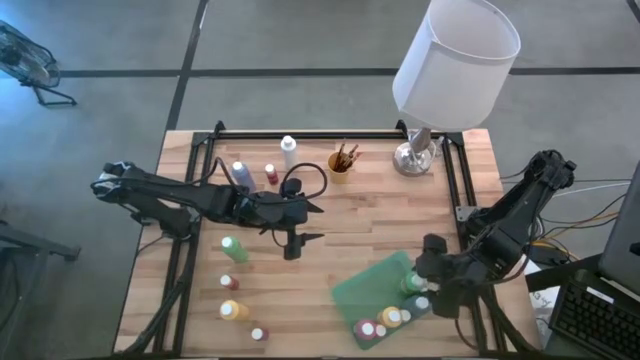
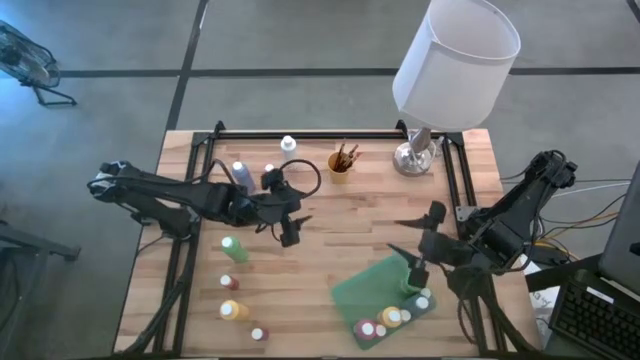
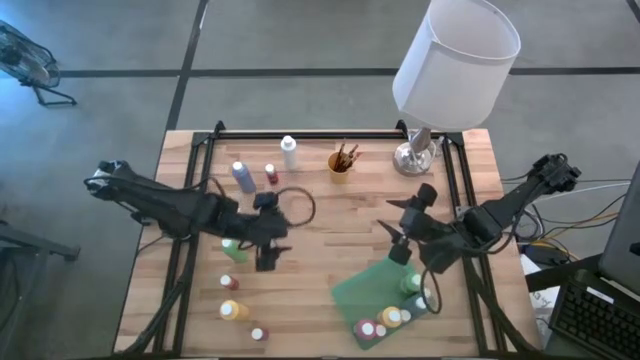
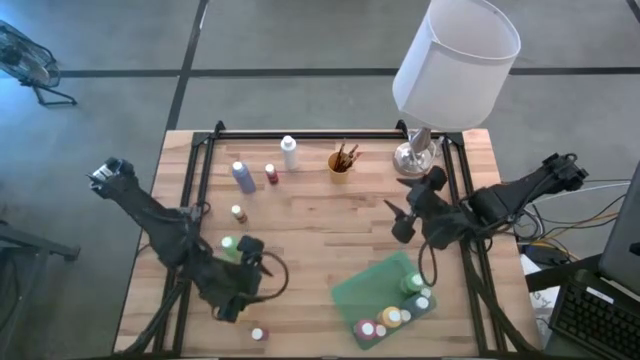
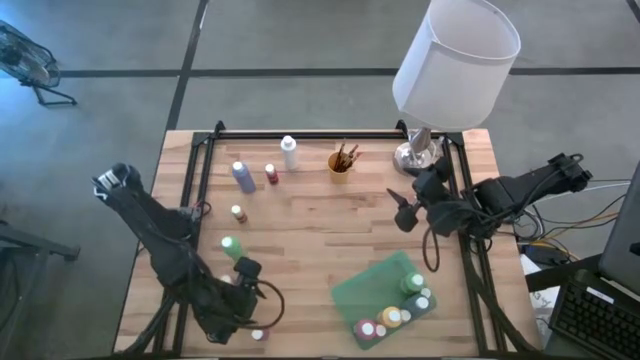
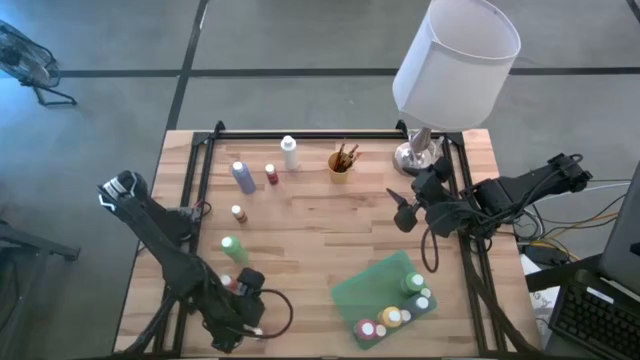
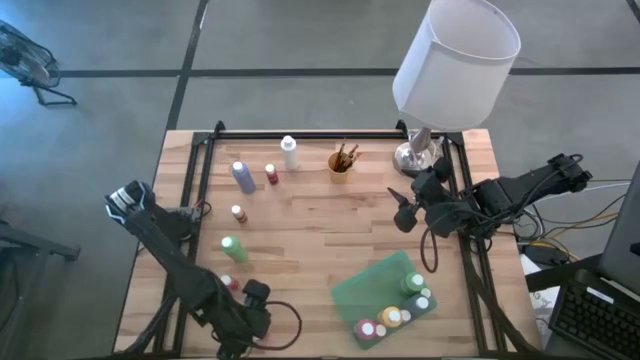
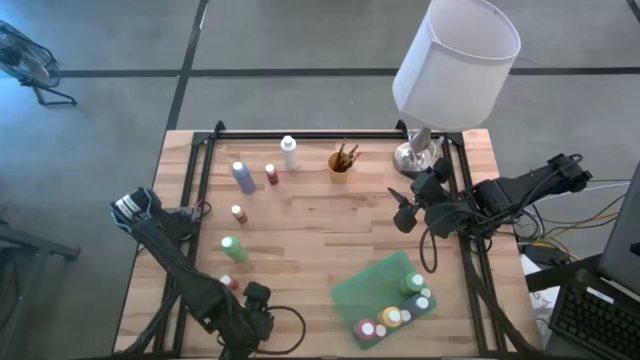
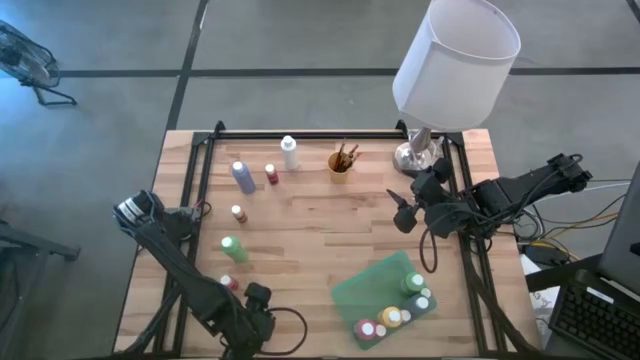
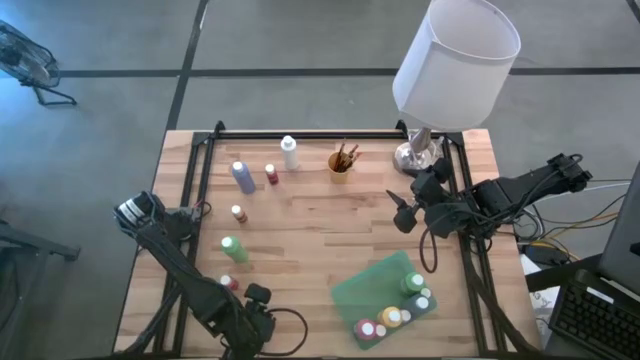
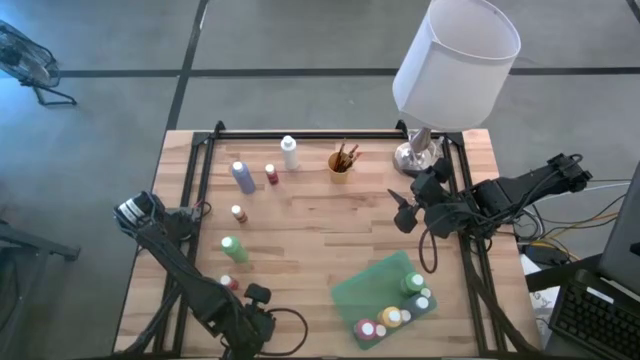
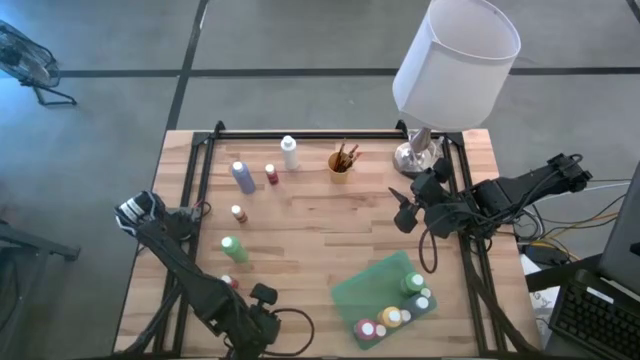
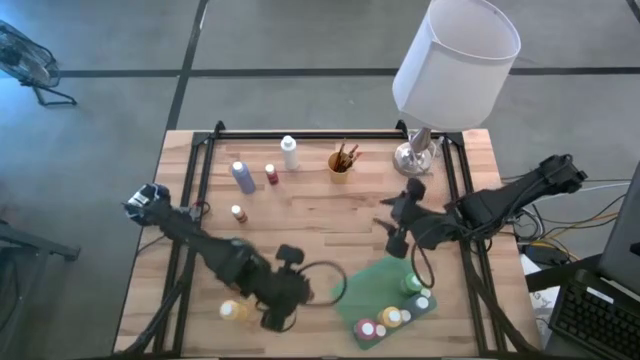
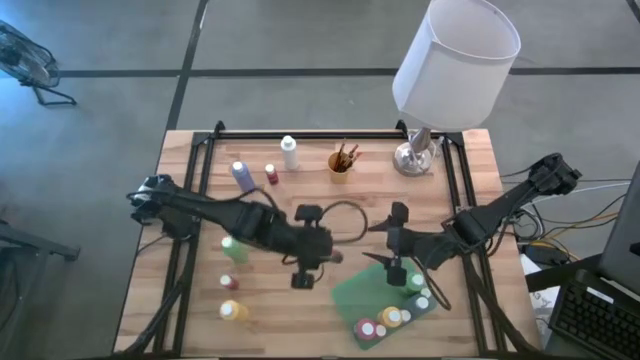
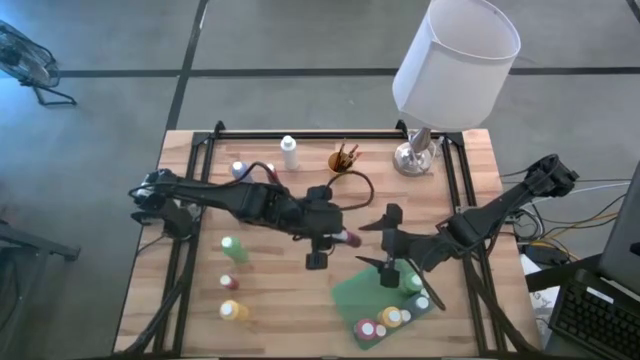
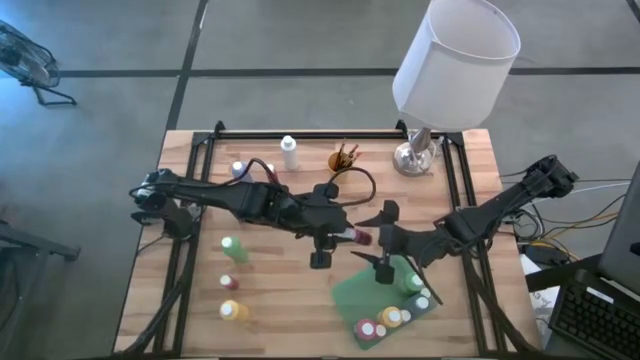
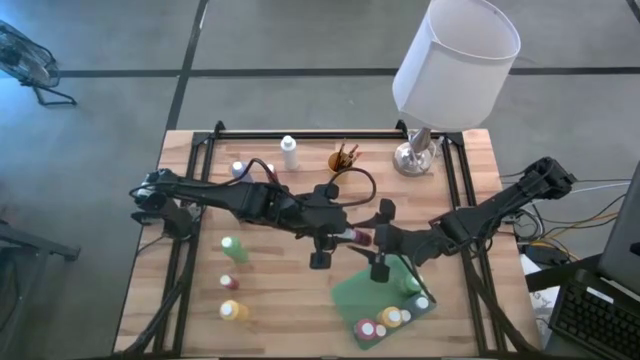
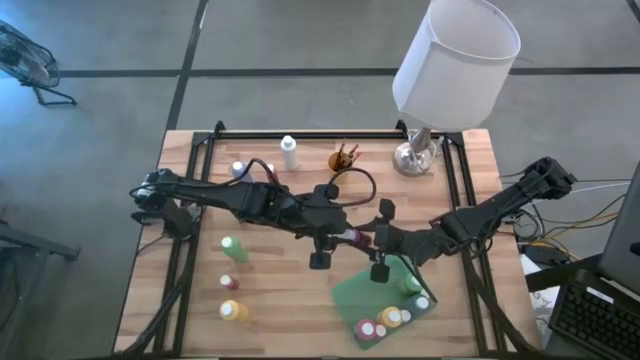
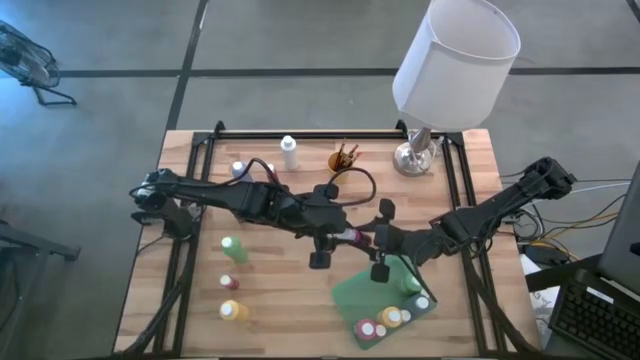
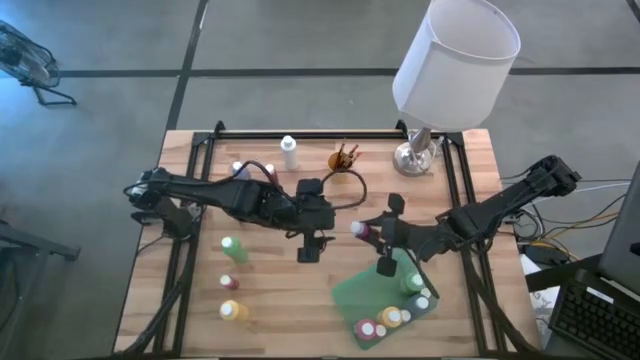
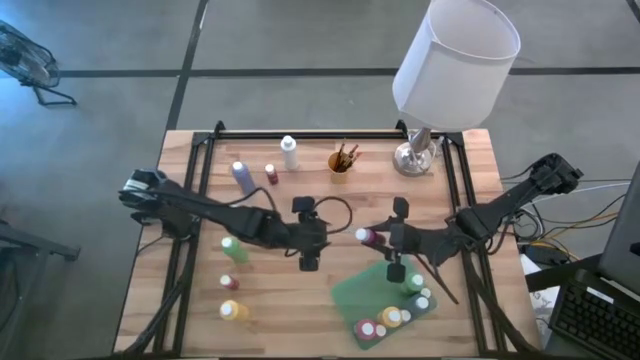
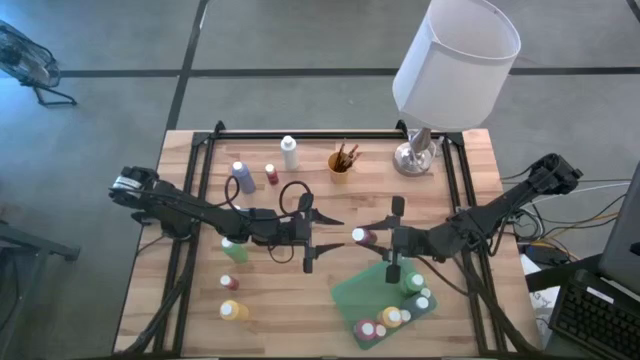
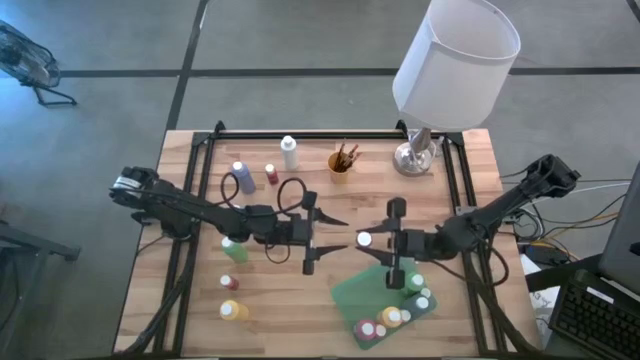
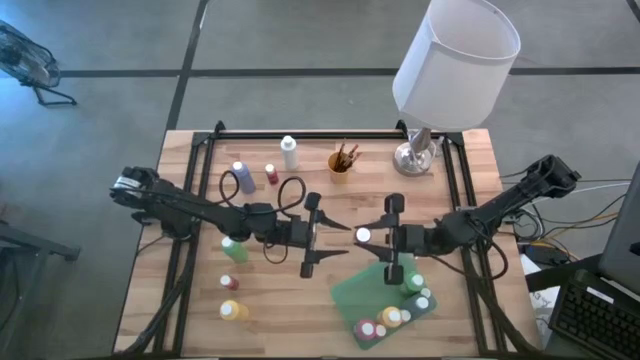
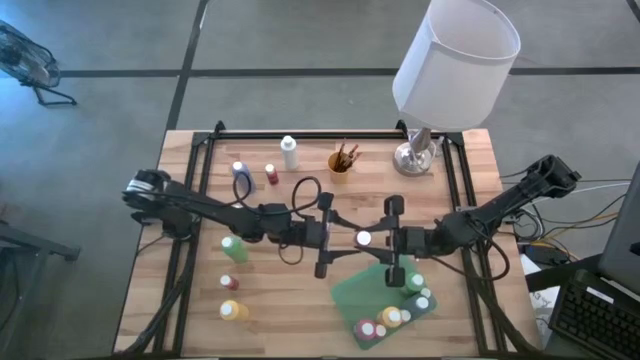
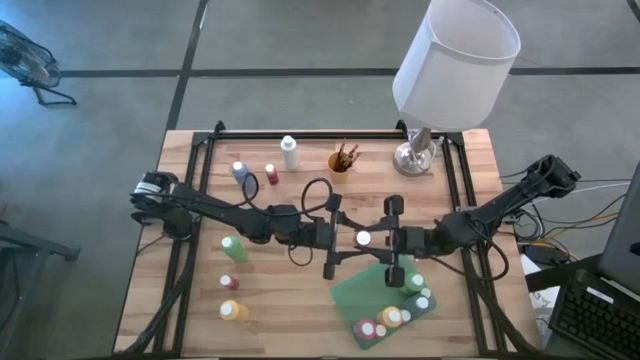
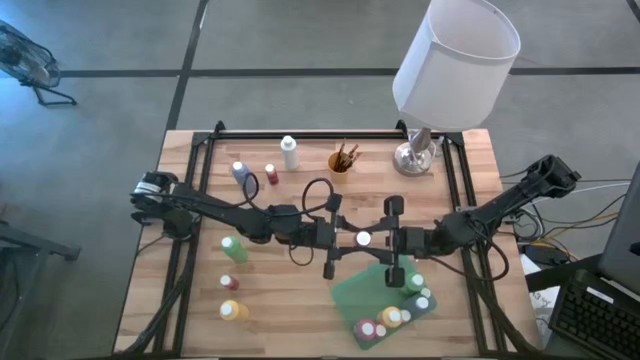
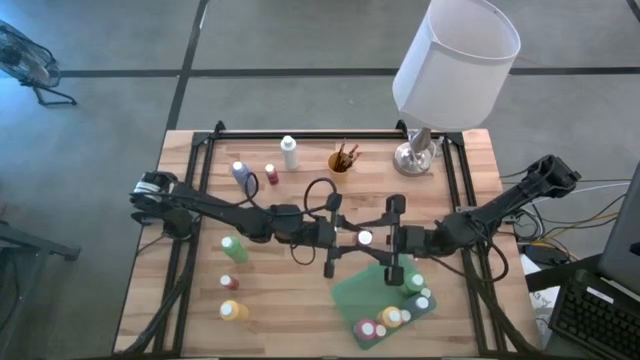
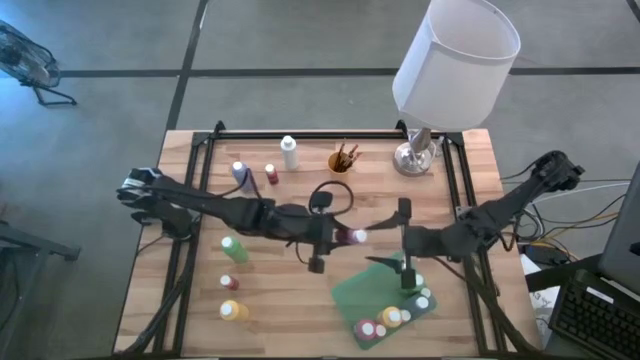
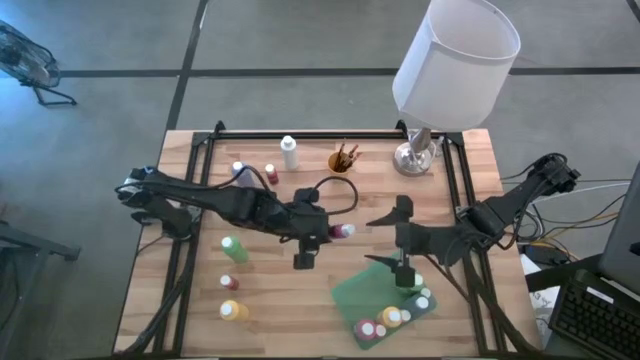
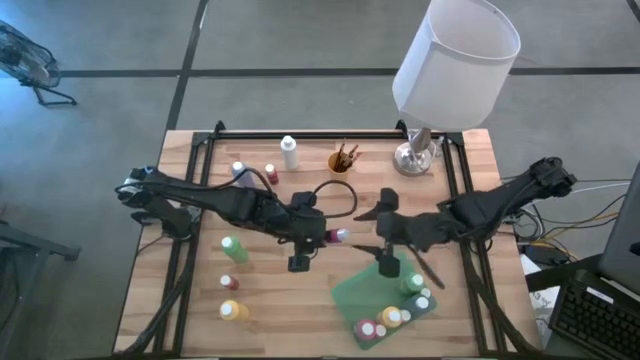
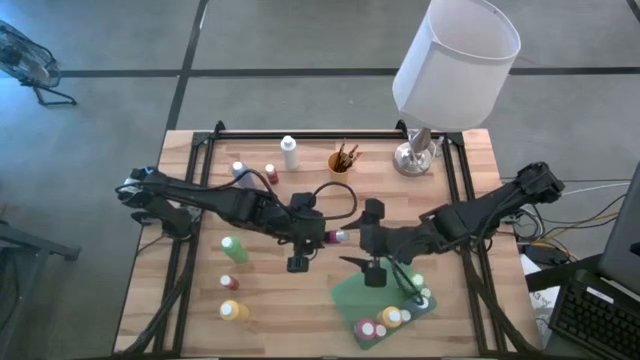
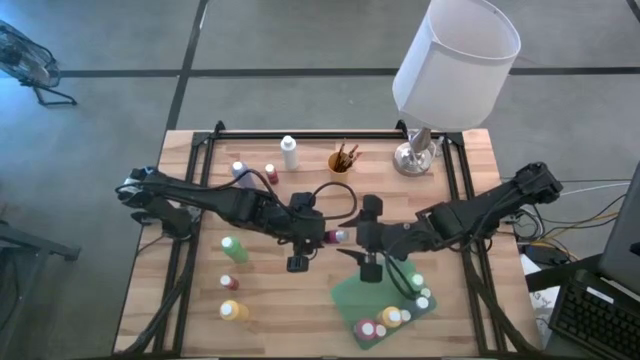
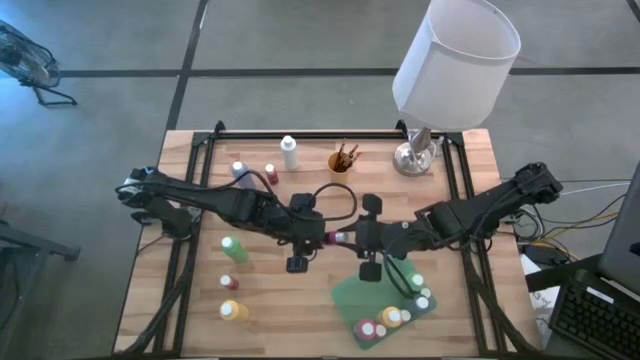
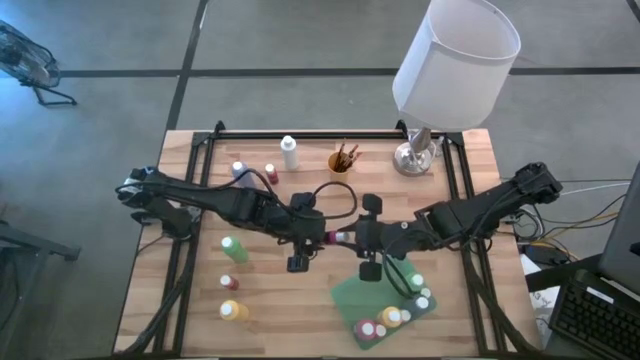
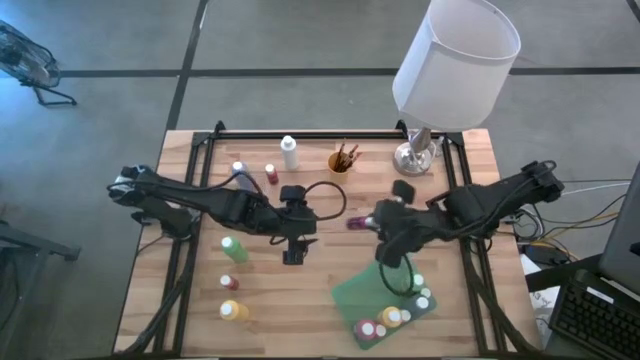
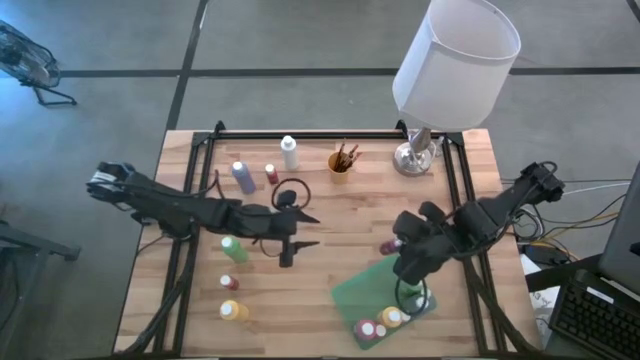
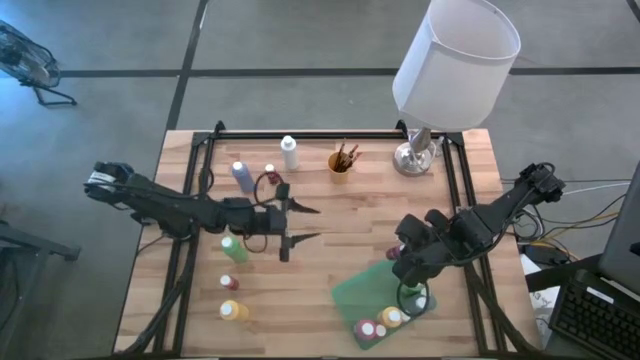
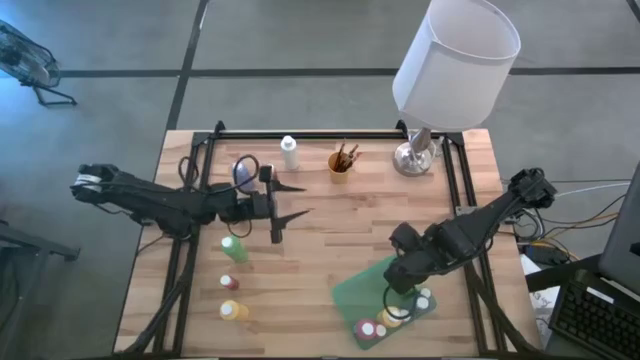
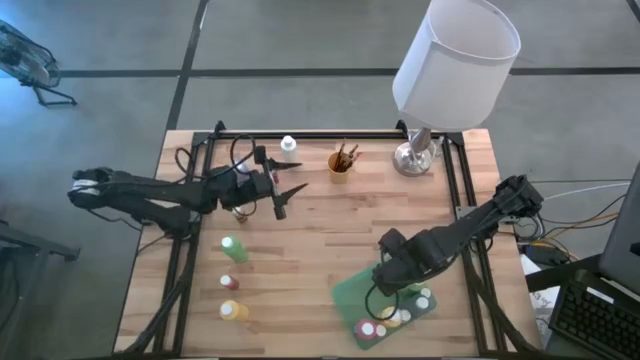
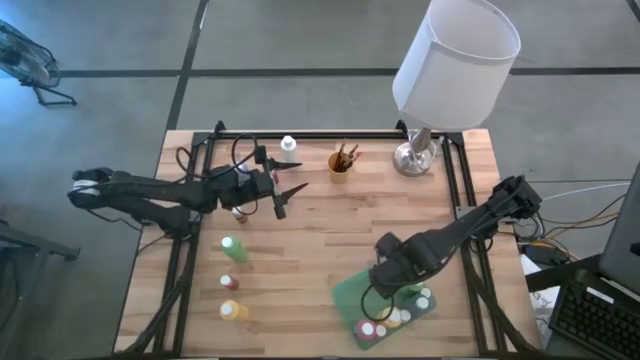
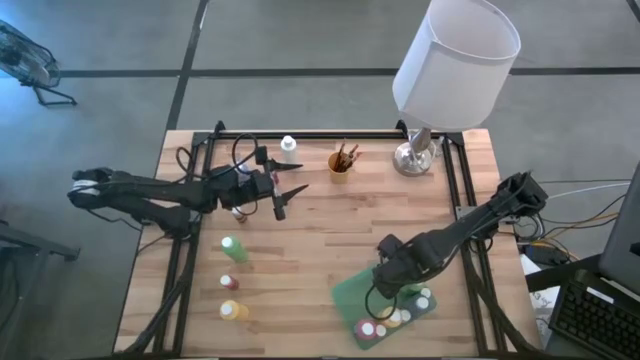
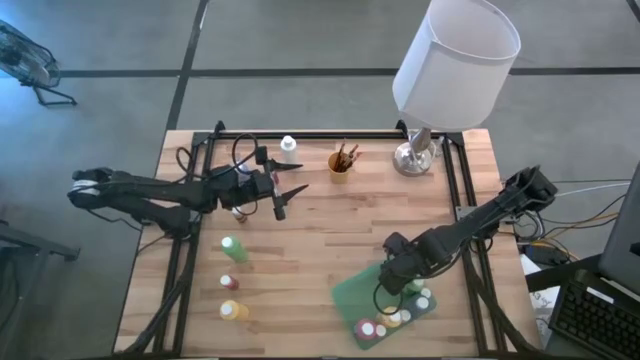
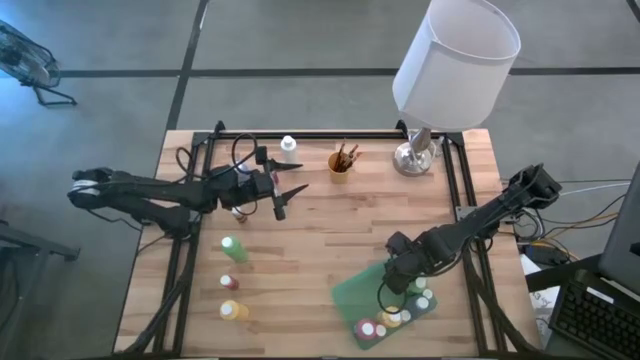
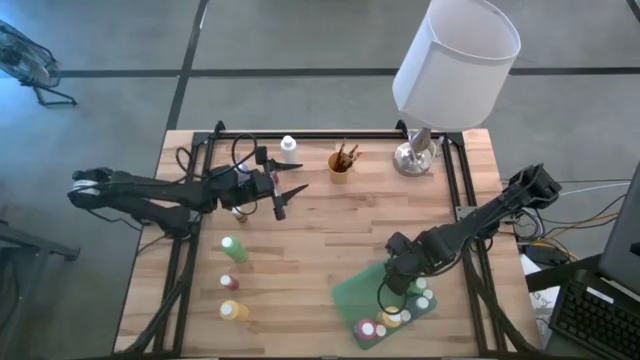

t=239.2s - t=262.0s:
Task: Pick & Place Paint Supplies
Put the pink paint bottle into the green bin
